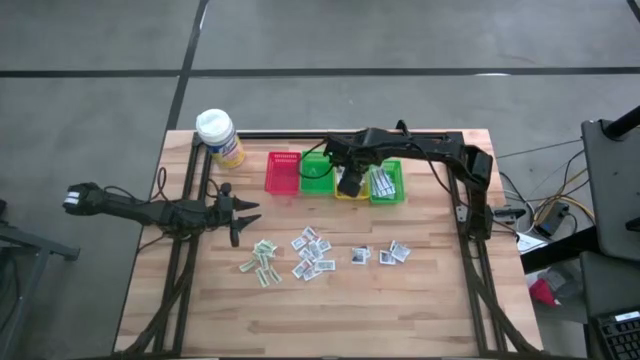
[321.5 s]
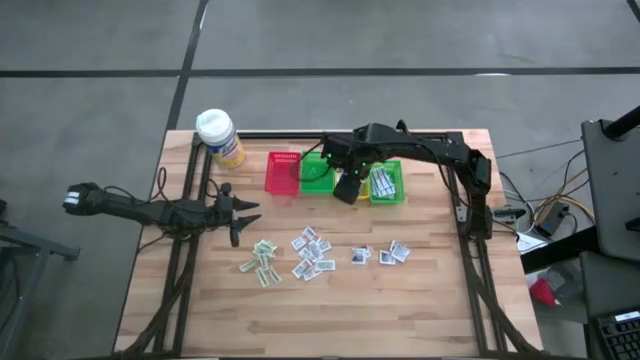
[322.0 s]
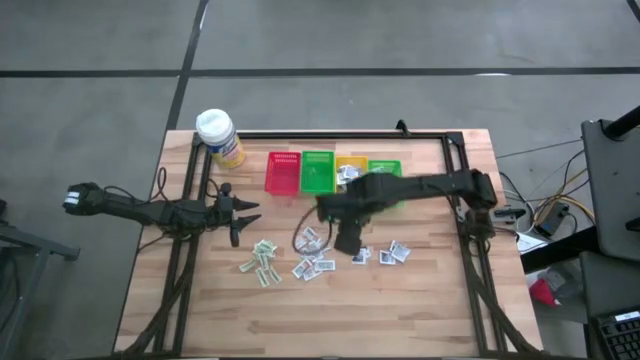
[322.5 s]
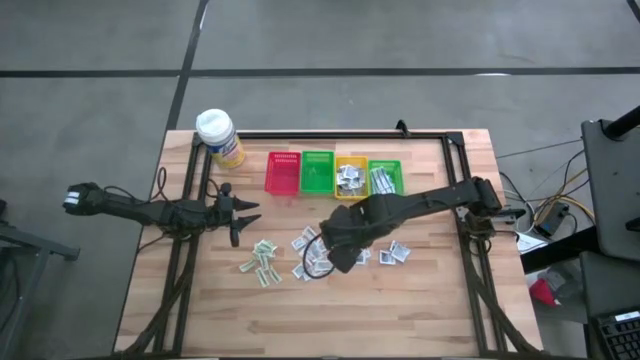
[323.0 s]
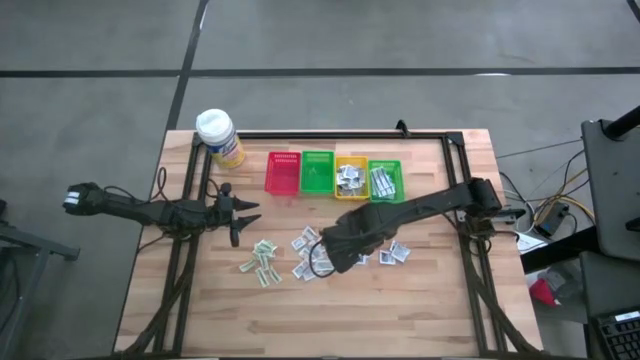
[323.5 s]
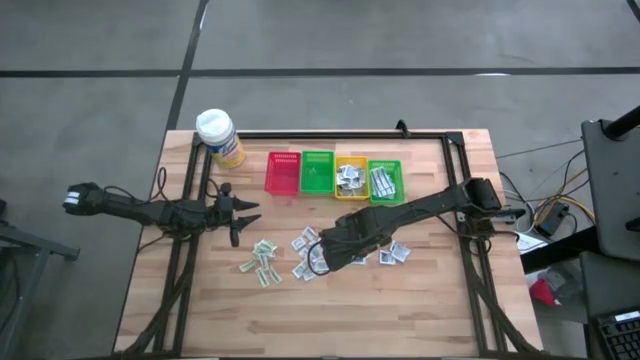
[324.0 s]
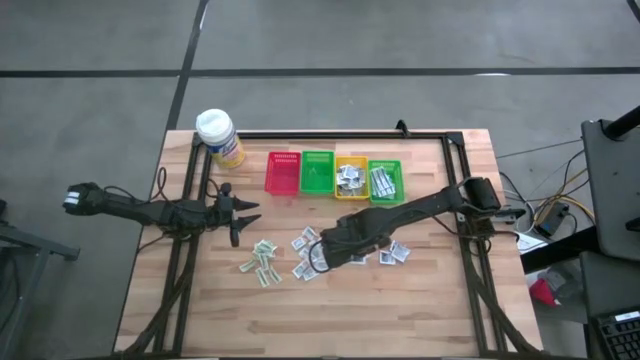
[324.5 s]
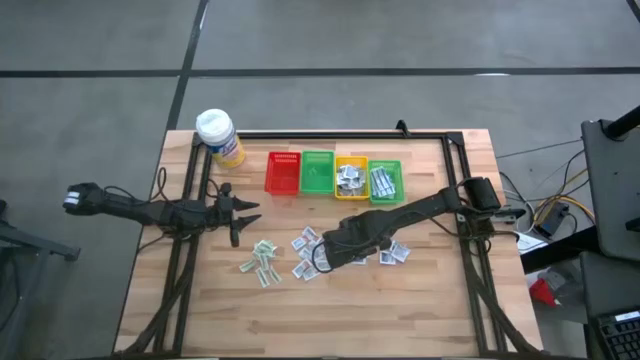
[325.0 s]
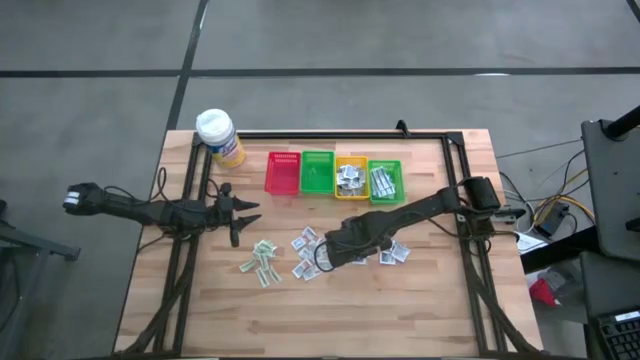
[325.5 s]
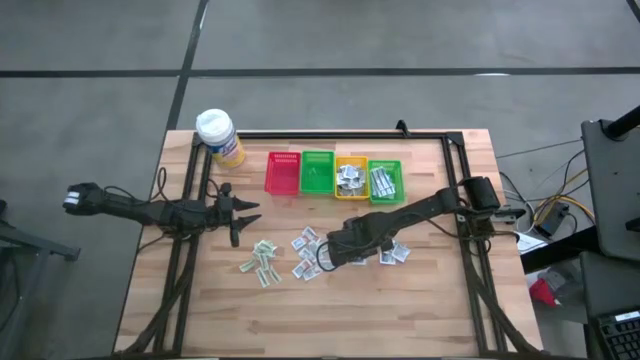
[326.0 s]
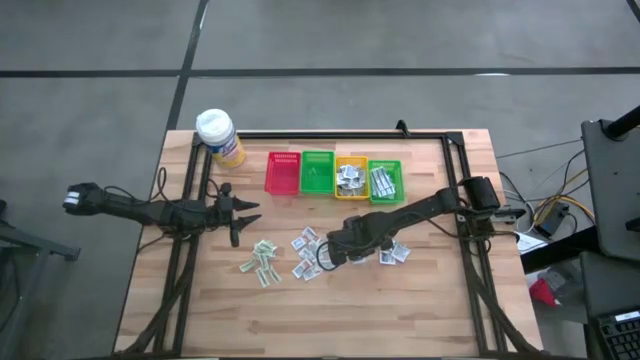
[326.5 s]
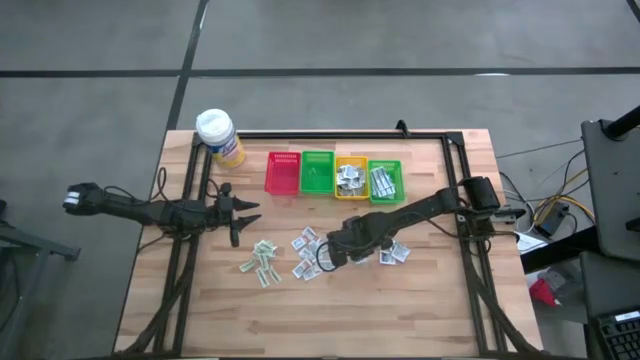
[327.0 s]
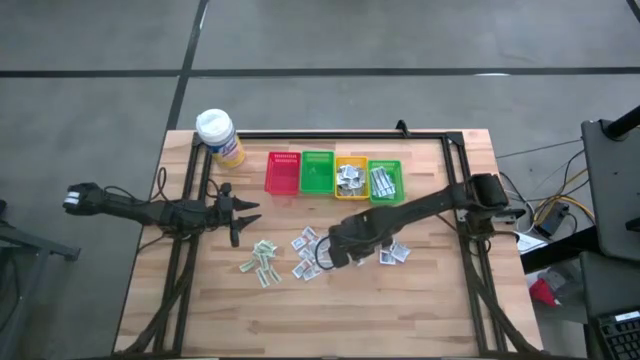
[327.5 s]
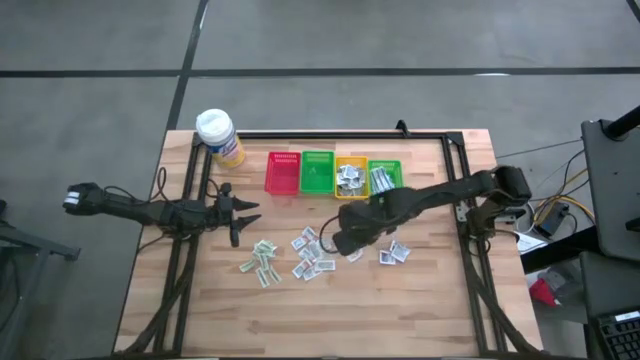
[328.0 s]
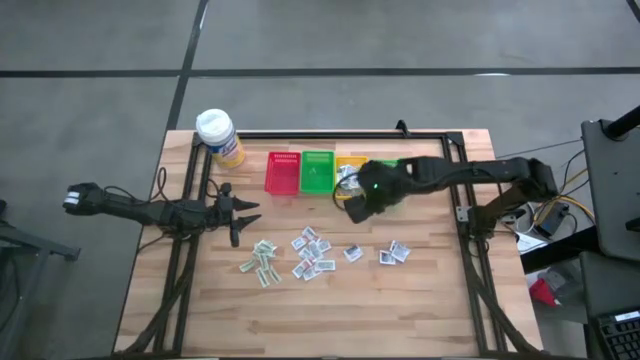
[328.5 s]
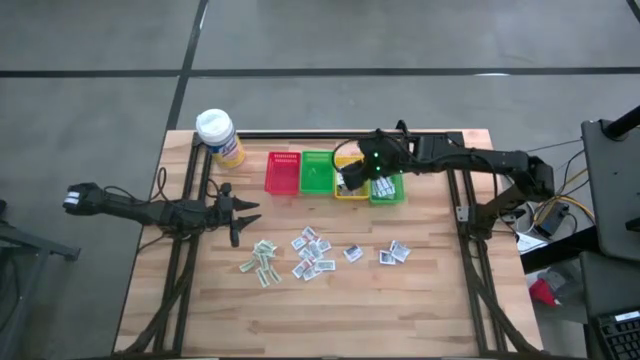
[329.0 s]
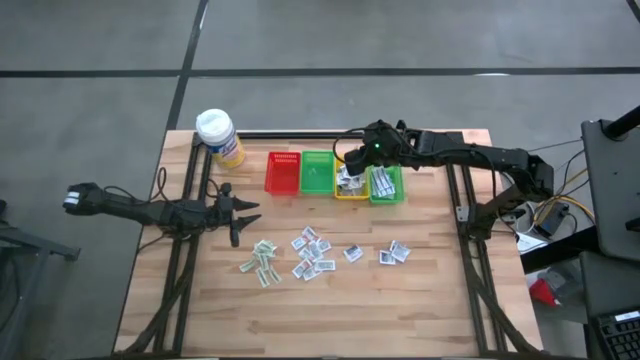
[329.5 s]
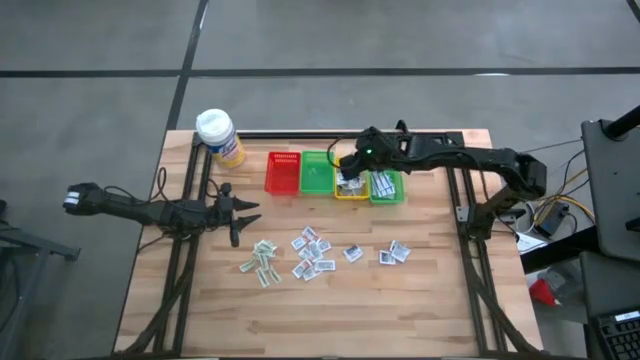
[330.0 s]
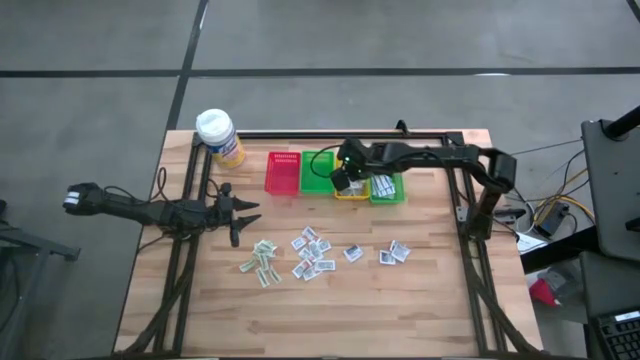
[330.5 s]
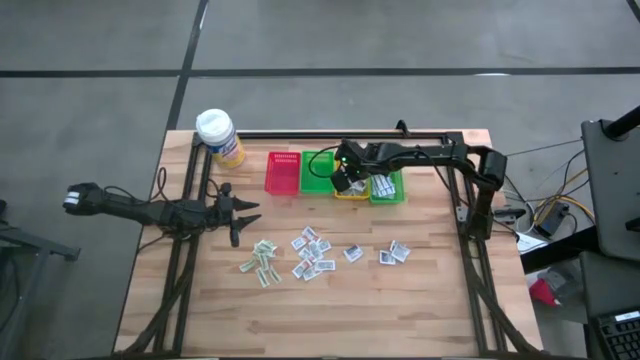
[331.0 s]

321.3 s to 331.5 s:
Task: Pick & Place First Aid Supplies
Put the blue alcohol pad into the yellow bin

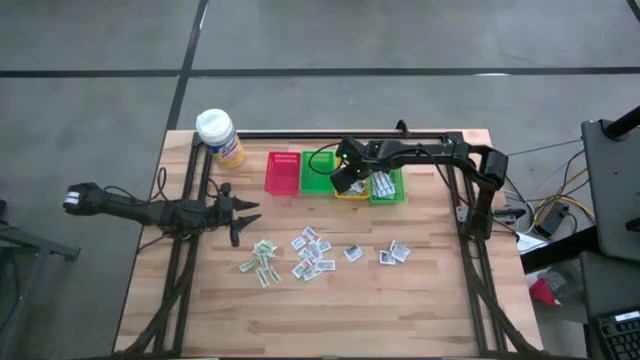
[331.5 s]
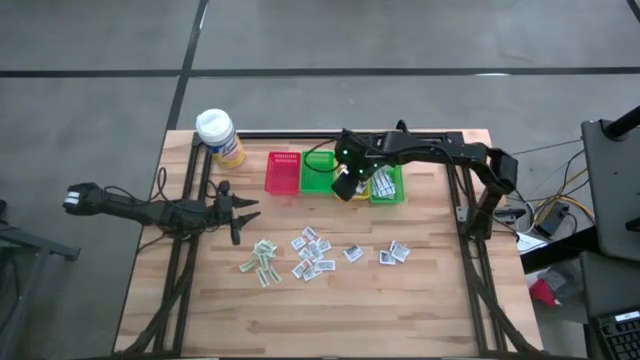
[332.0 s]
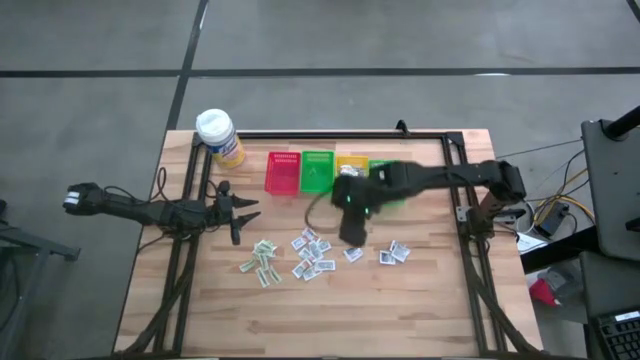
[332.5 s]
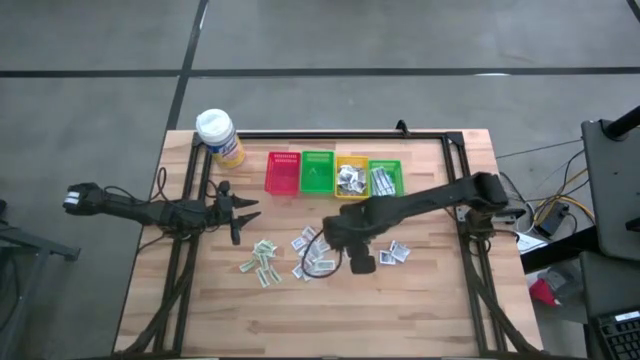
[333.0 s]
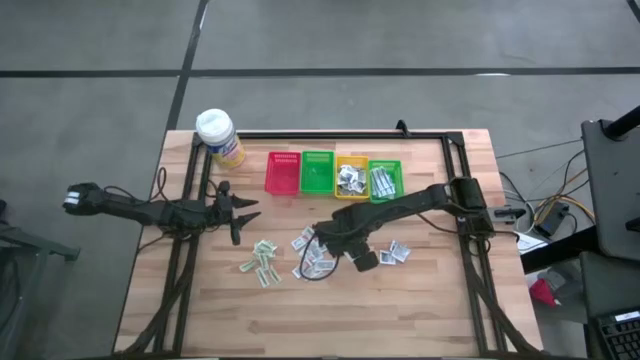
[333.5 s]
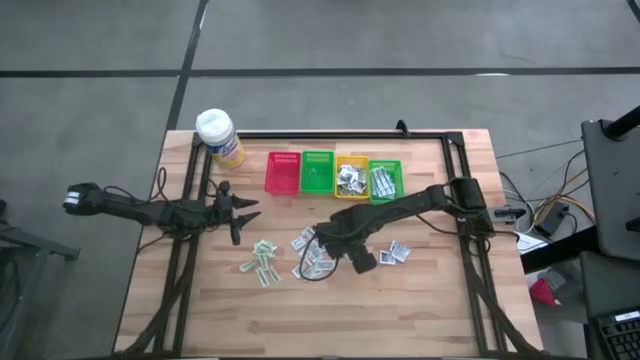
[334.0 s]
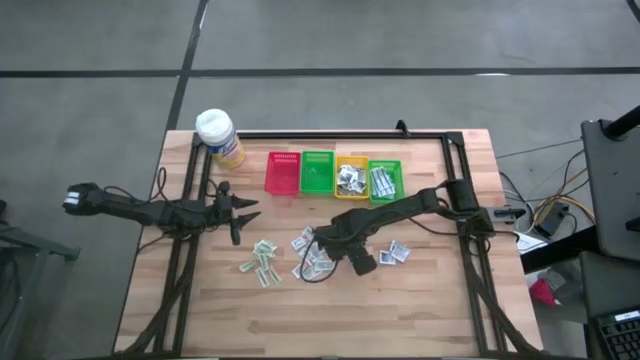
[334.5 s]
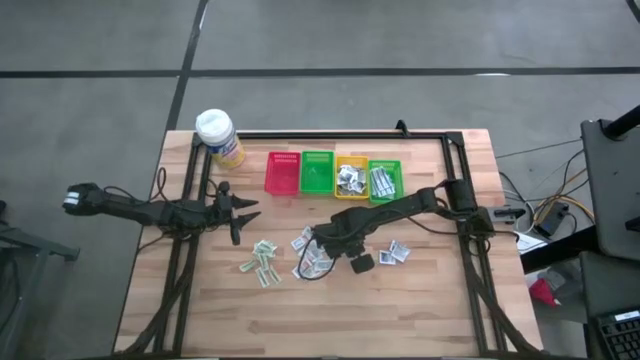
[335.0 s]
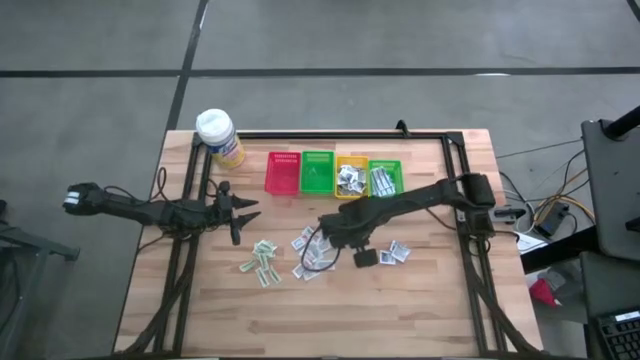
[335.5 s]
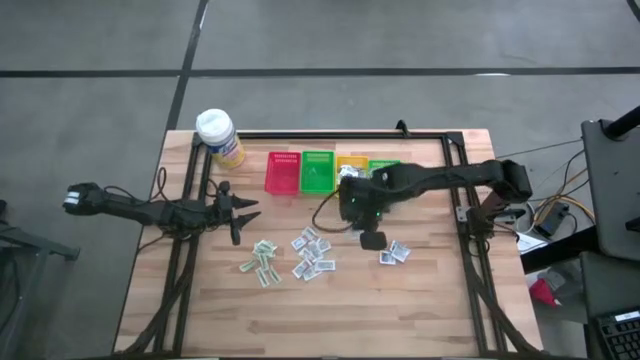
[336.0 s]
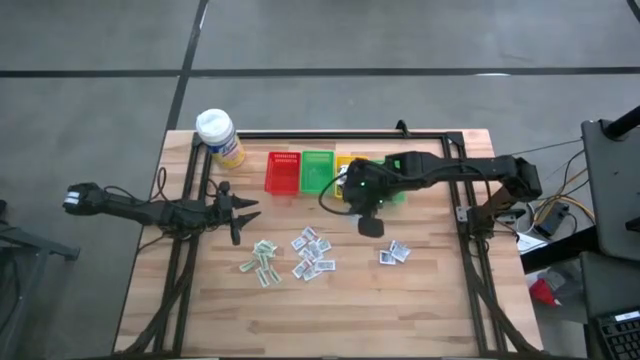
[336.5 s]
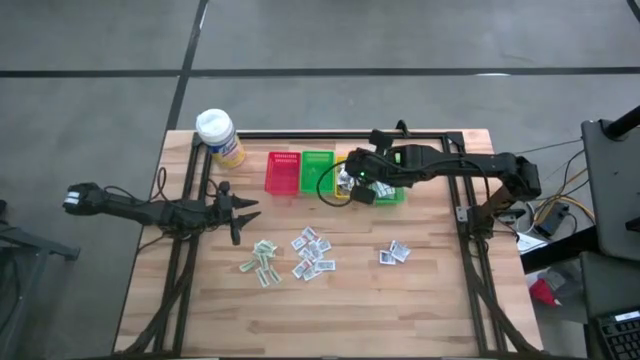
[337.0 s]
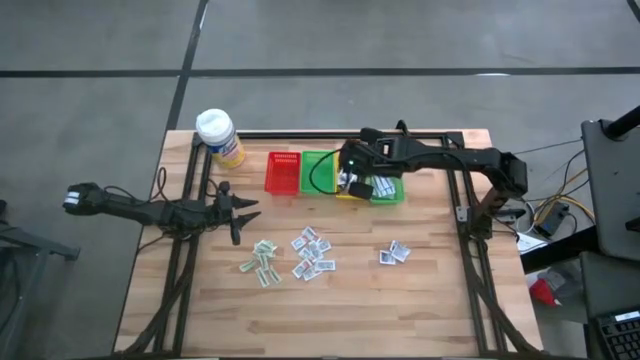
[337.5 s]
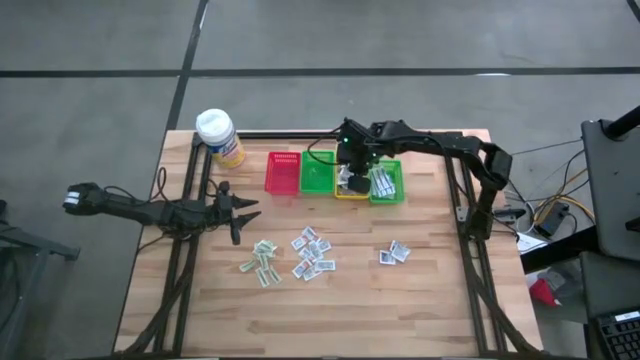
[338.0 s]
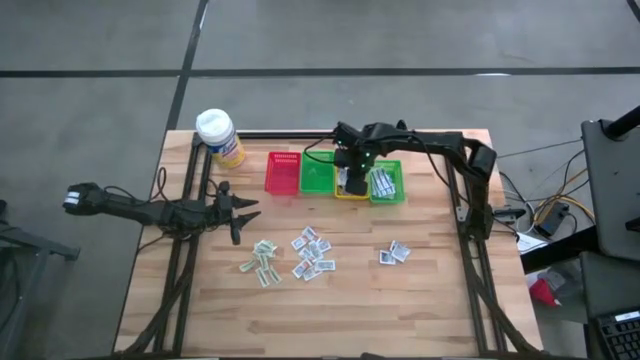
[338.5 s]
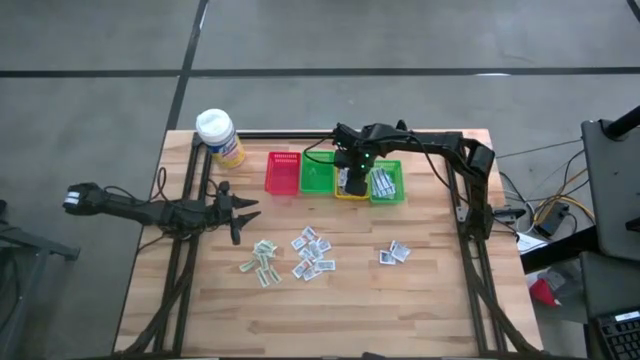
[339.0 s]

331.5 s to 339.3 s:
Put the blue alcohol pad into the yellow bin

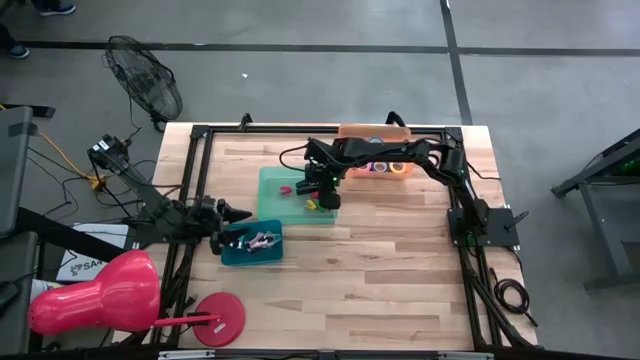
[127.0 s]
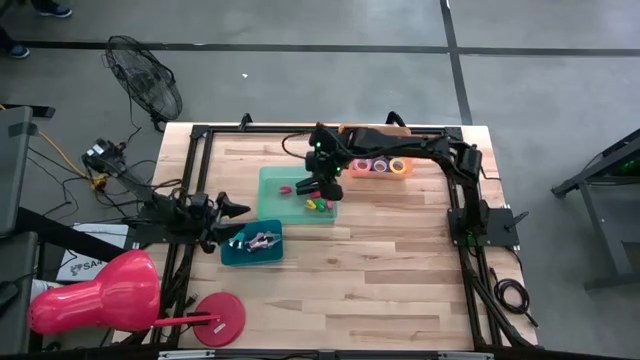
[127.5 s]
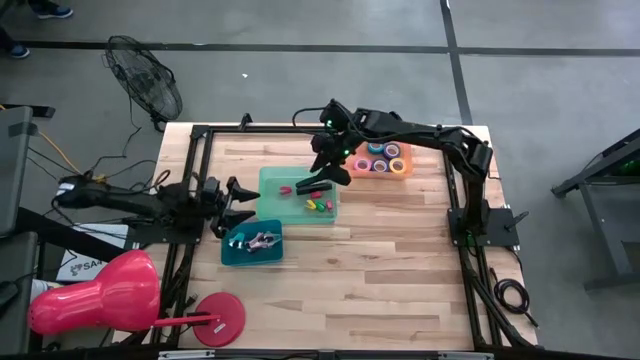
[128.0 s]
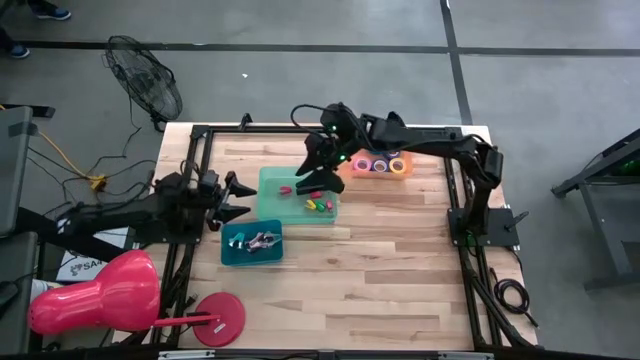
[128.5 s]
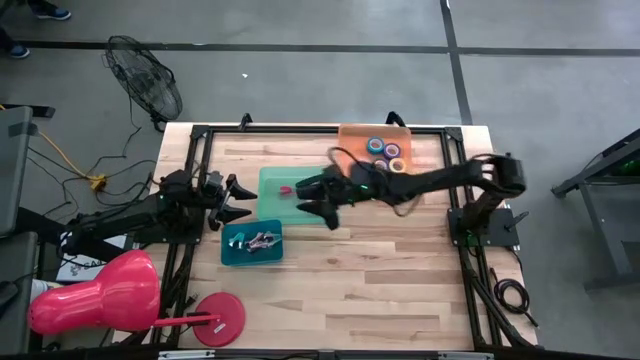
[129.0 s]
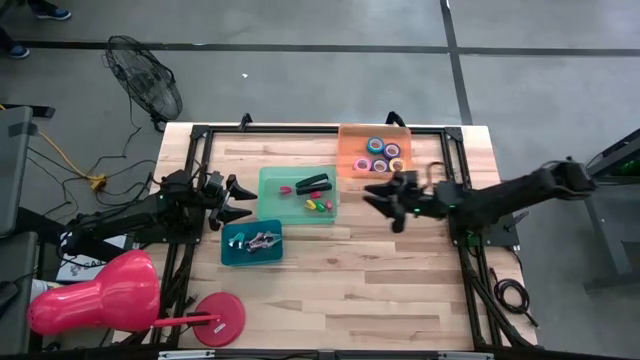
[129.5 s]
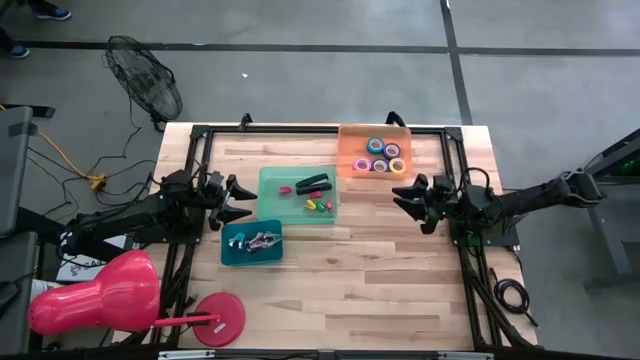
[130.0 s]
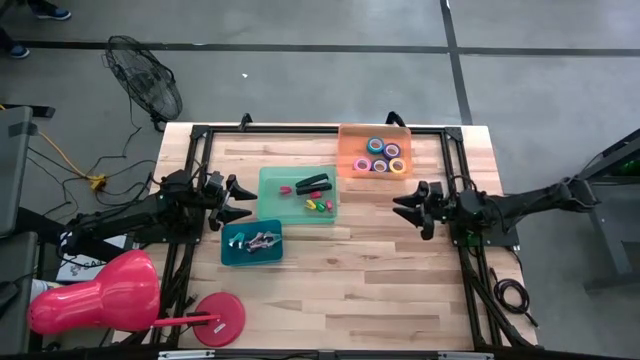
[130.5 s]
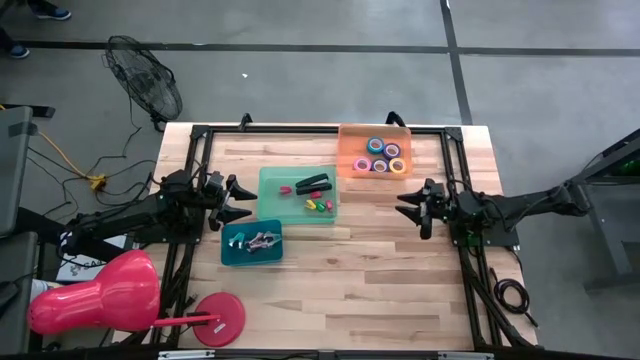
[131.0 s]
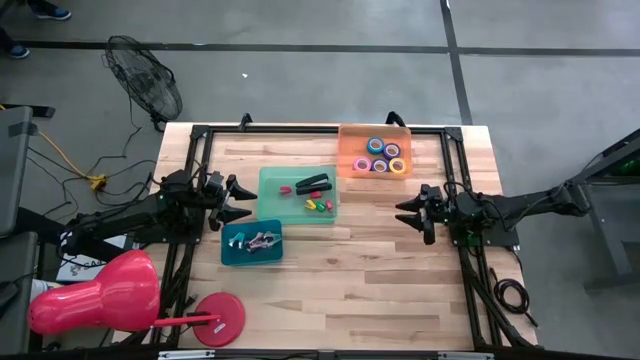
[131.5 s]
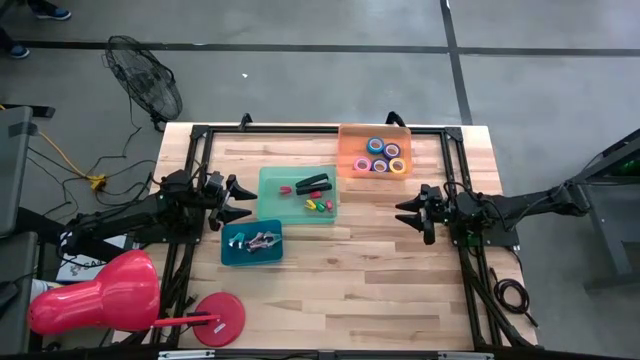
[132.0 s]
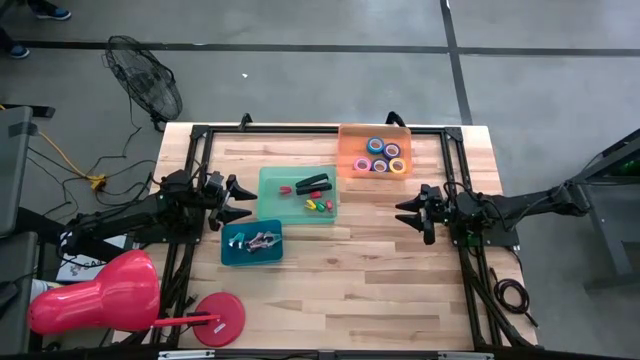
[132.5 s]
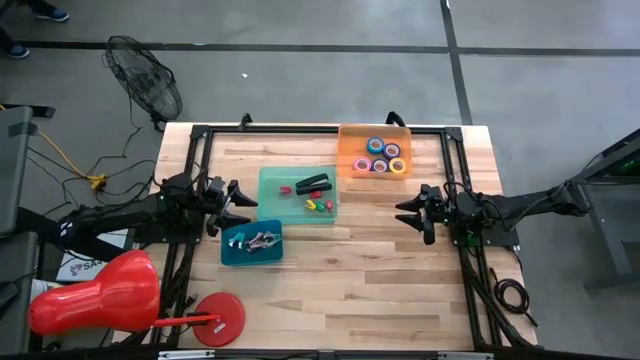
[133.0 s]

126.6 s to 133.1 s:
Task: Pick and place Stapler, Stapler remover, tape
Return to Home Position
